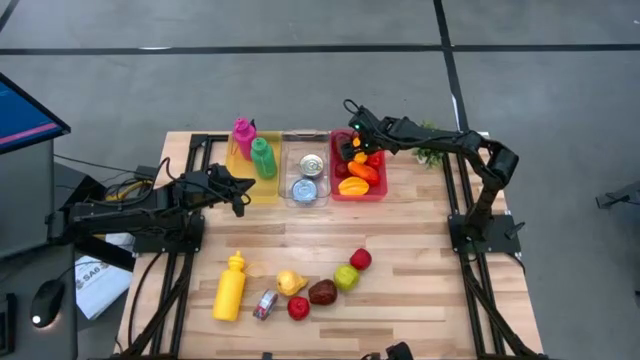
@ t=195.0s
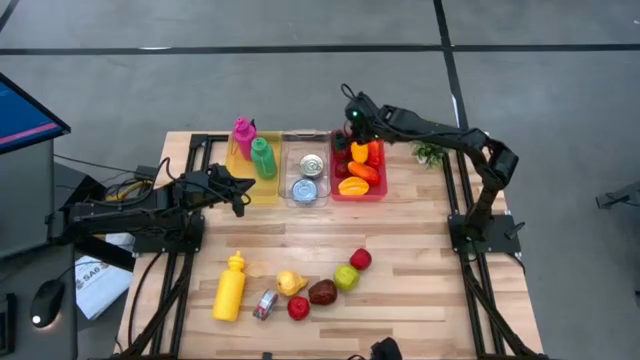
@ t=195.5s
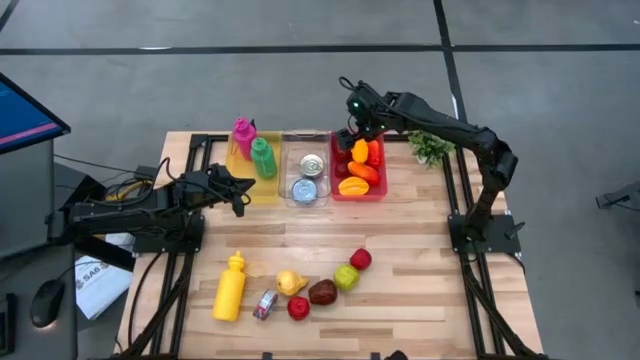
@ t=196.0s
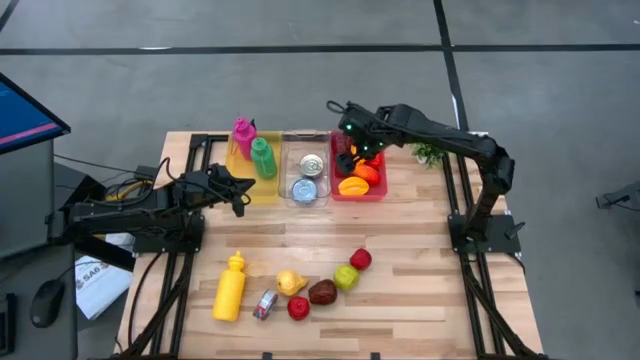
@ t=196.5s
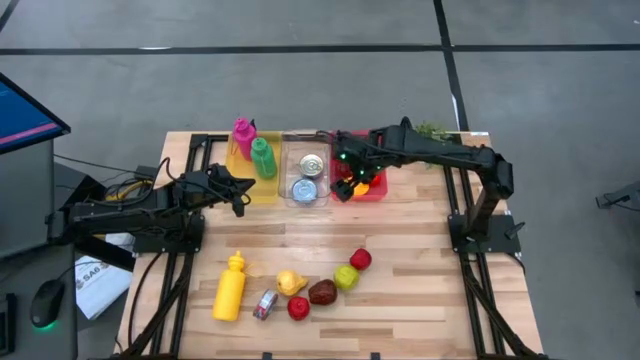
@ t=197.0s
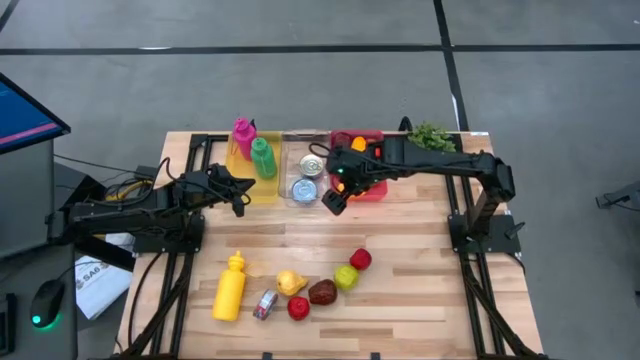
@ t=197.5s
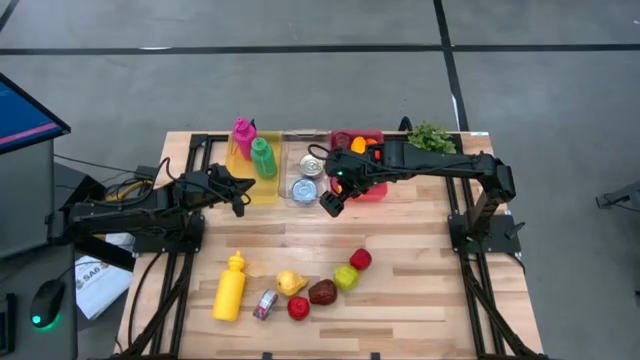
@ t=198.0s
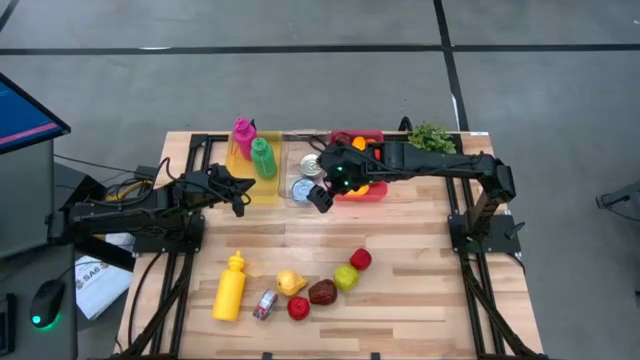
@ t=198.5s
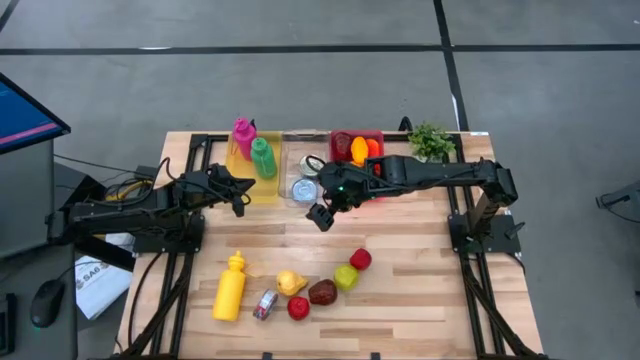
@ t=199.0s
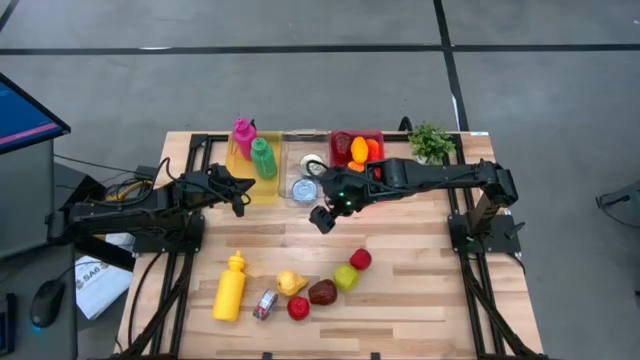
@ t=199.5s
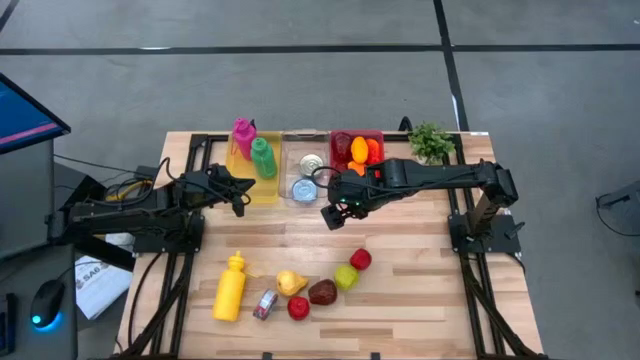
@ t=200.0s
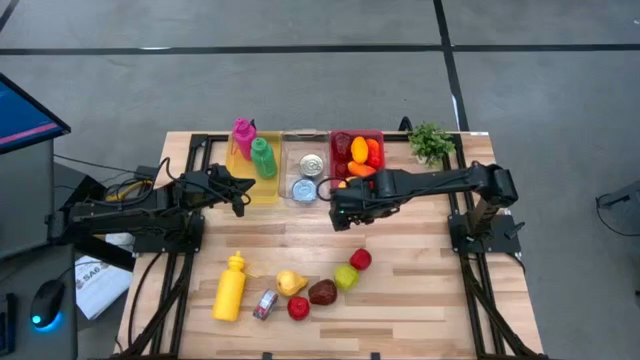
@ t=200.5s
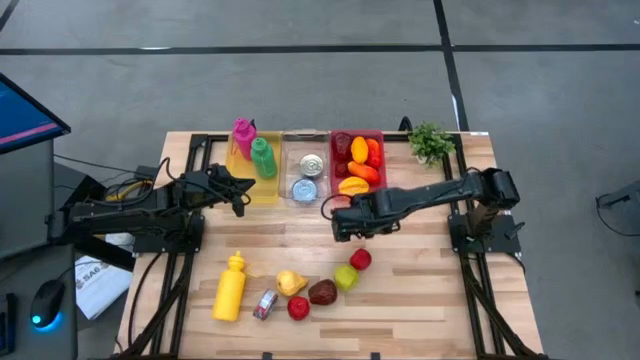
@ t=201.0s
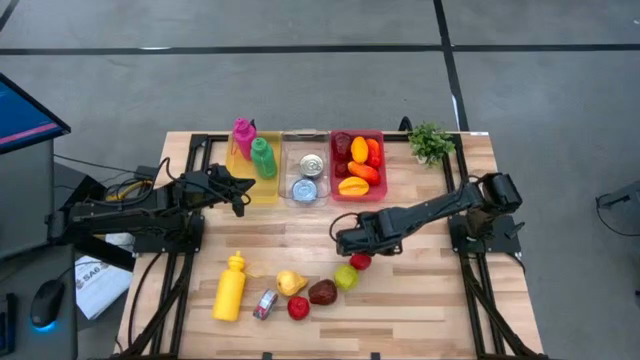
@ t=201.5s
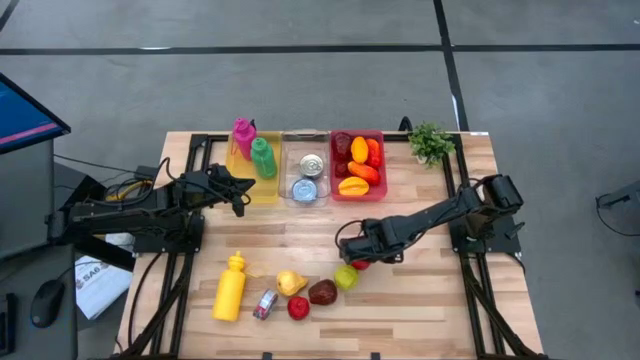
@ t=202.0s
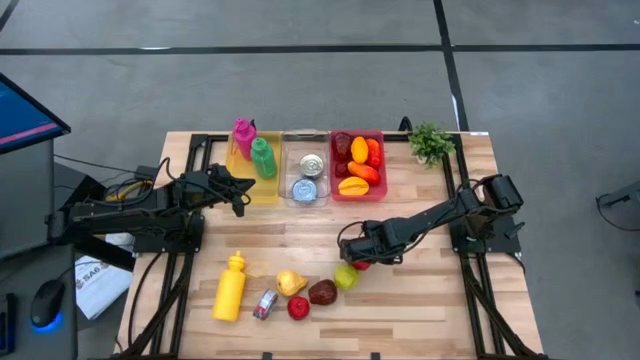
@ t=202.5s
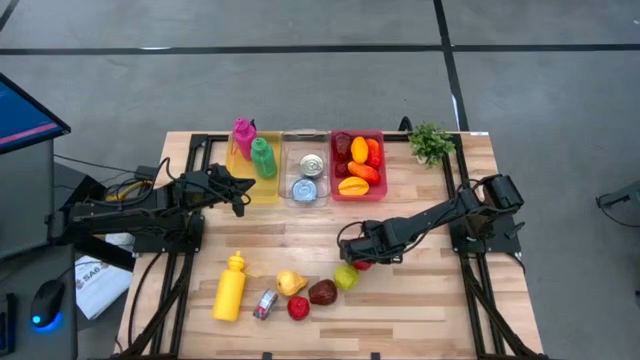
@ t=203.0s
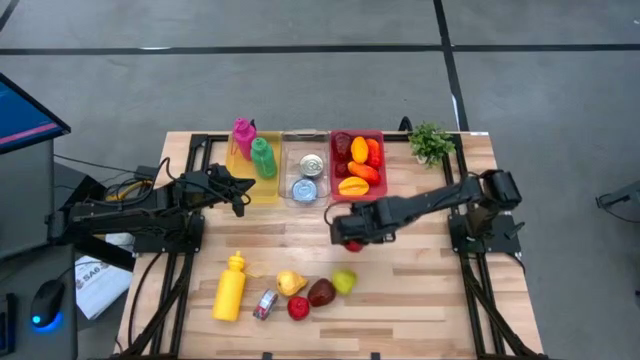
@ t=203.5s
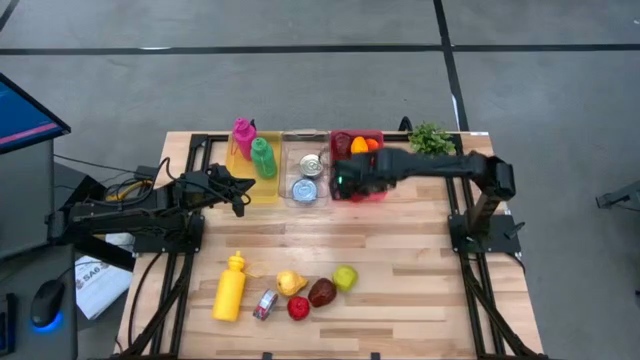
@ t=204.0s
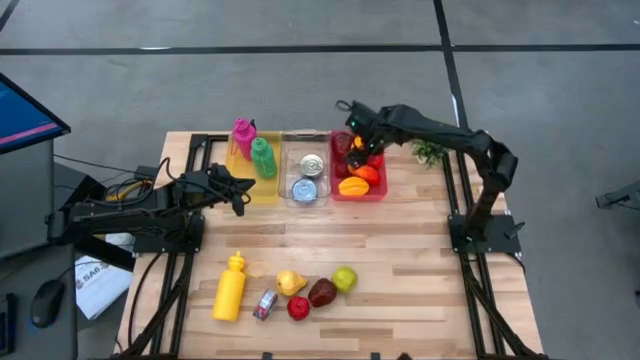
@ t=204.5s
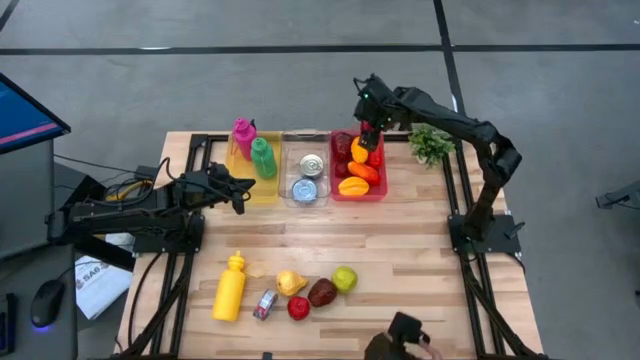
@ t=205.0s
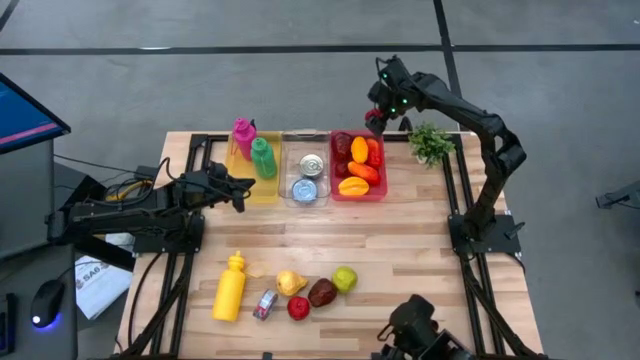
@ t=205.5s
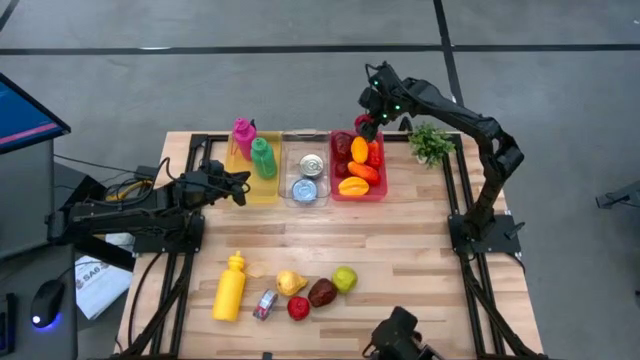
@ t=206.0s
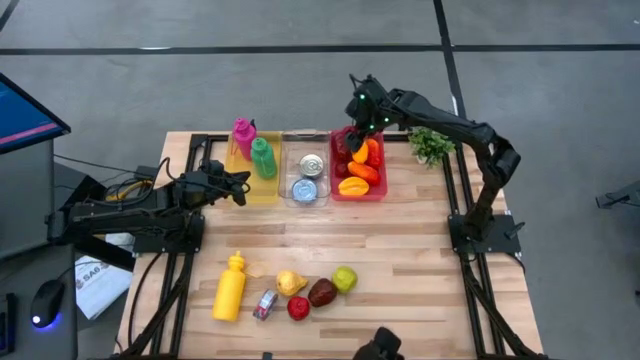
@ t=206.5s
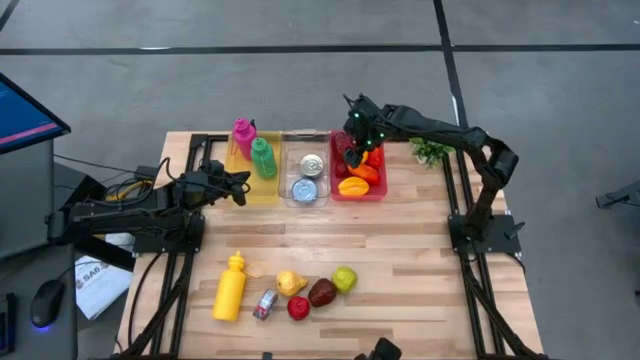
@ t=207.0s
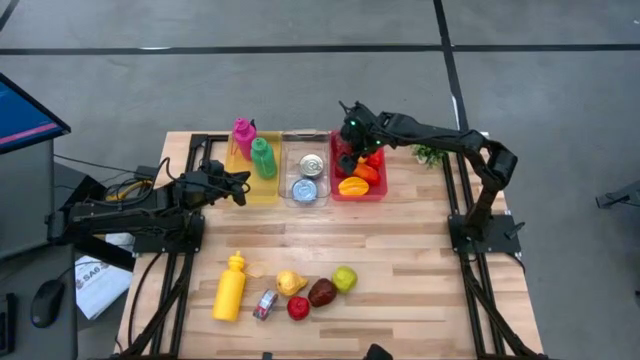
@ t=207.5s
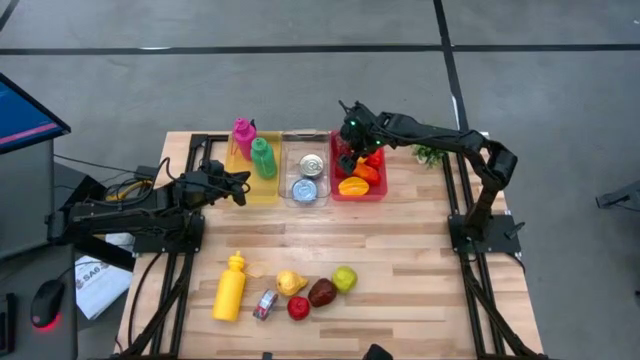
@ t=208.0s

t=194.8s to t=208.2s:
Task: Pick & Place Food Item
Put the top red apple into the pink bin

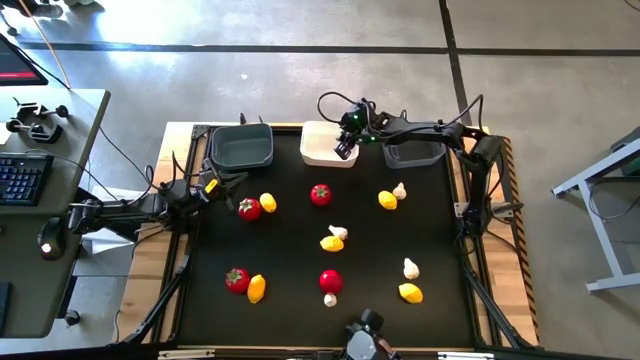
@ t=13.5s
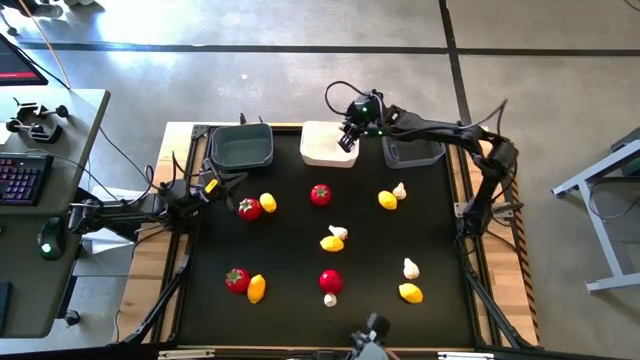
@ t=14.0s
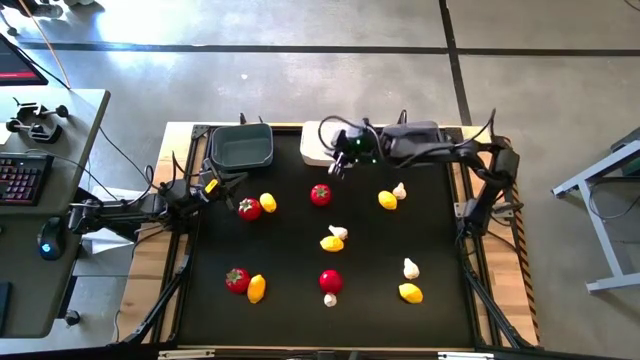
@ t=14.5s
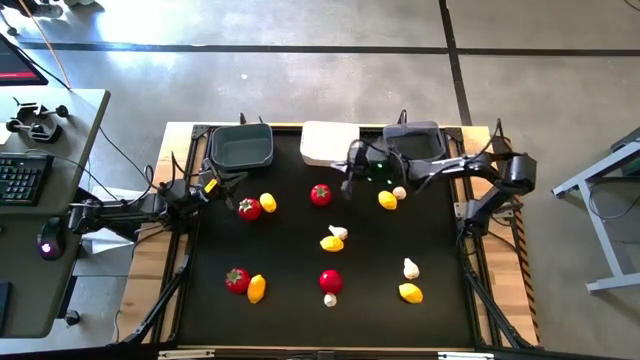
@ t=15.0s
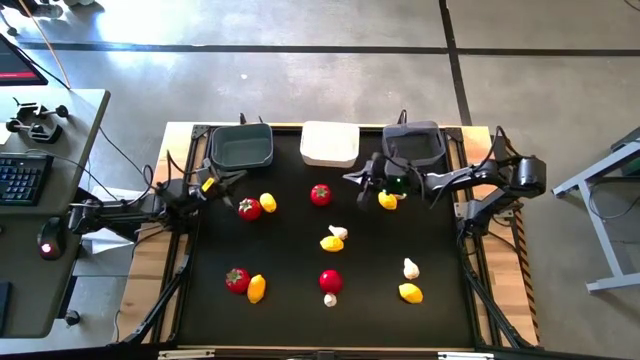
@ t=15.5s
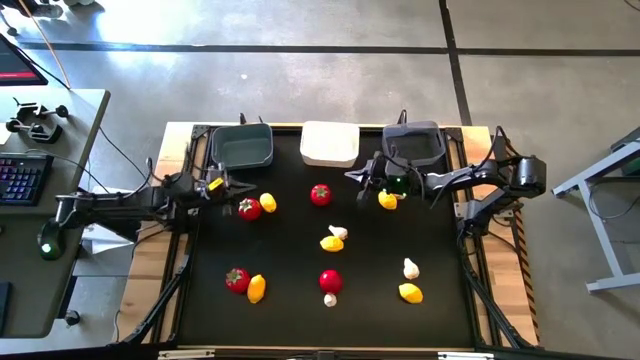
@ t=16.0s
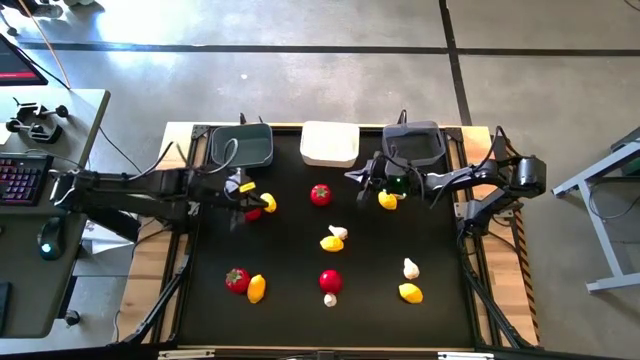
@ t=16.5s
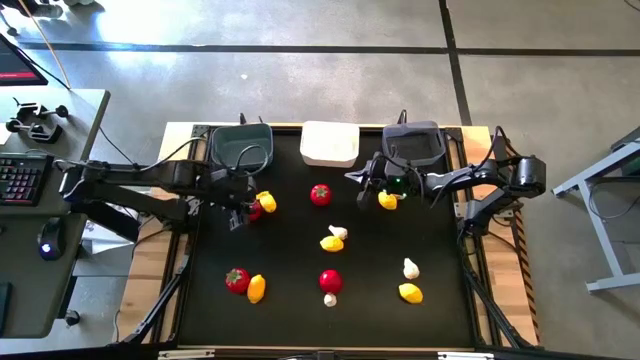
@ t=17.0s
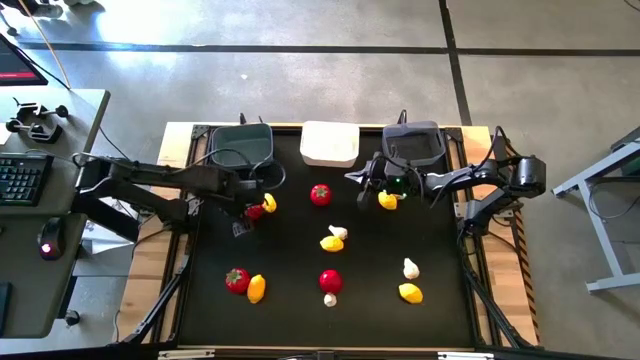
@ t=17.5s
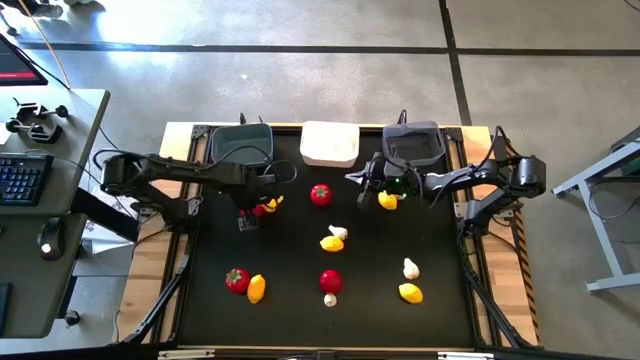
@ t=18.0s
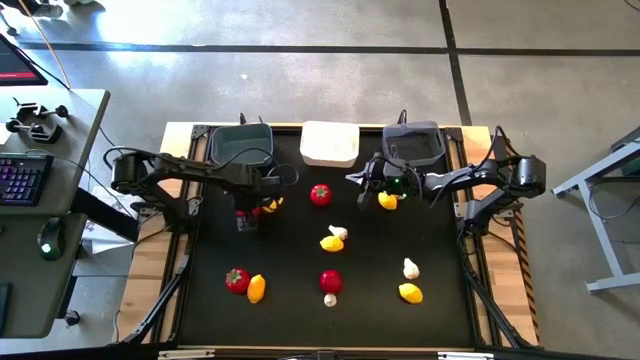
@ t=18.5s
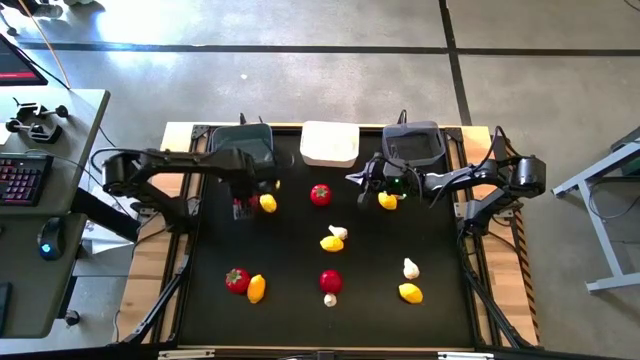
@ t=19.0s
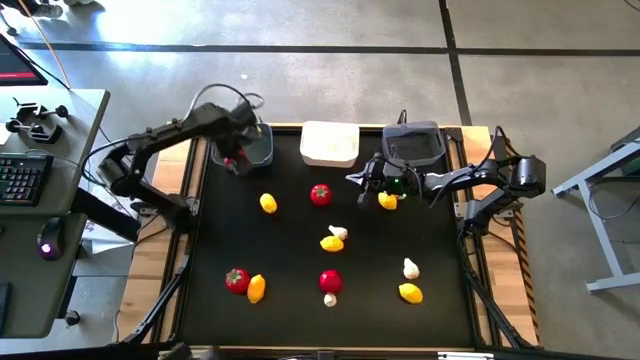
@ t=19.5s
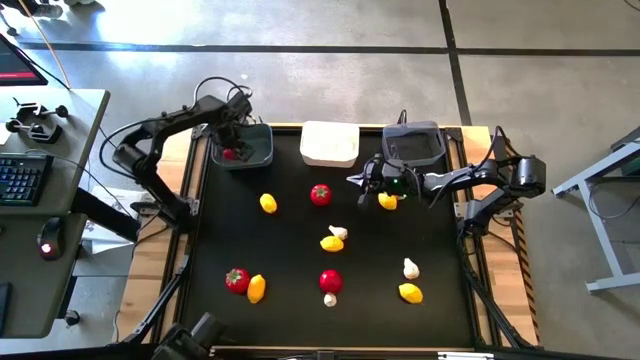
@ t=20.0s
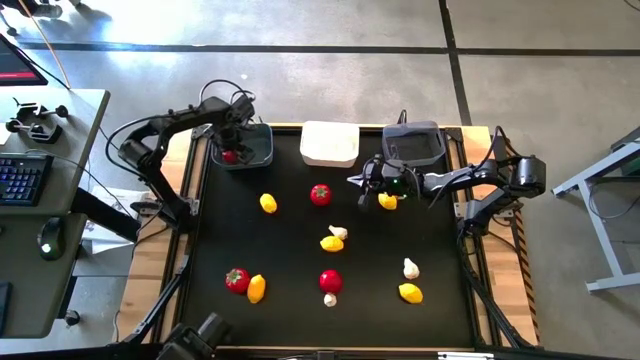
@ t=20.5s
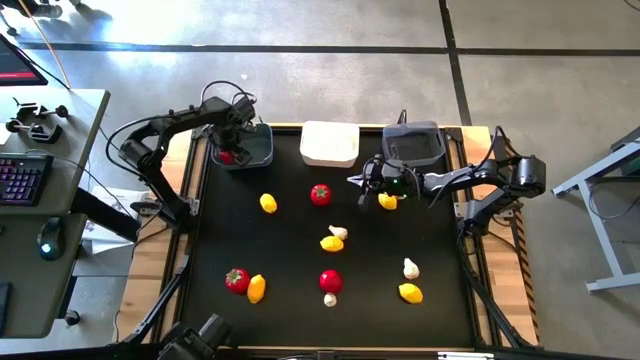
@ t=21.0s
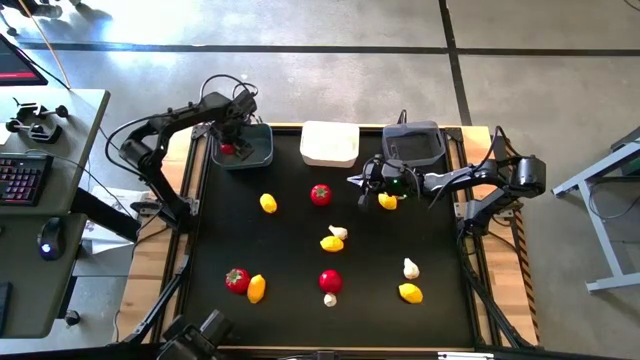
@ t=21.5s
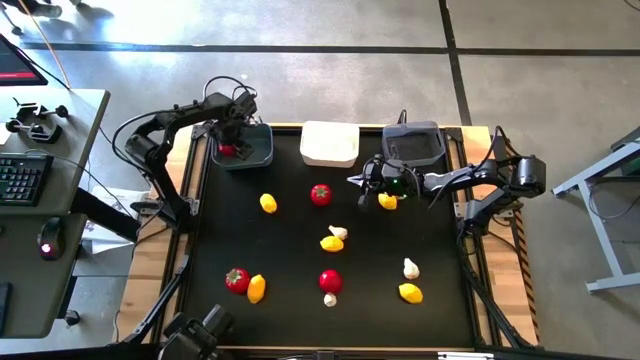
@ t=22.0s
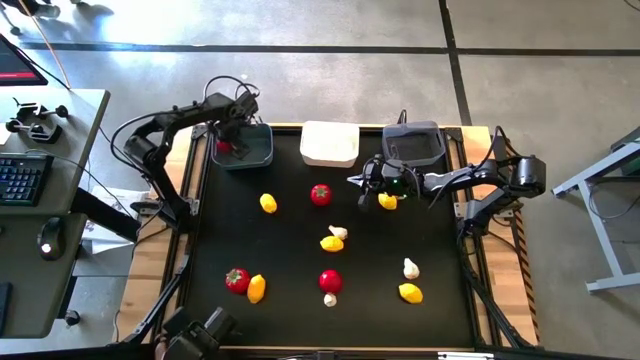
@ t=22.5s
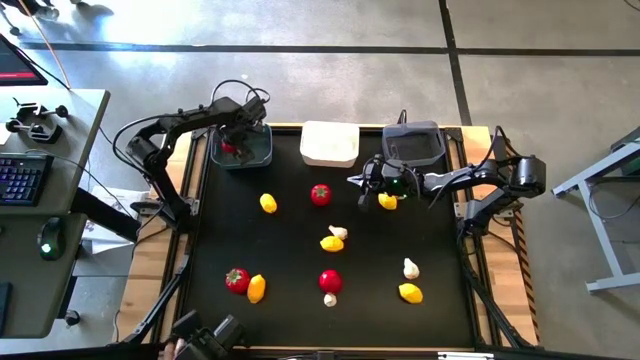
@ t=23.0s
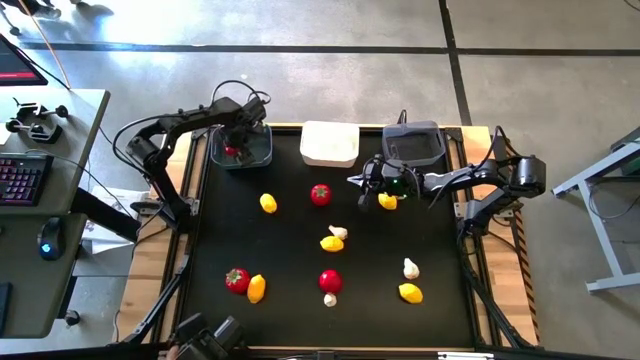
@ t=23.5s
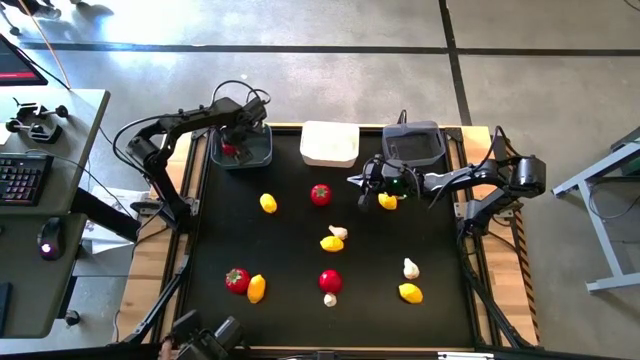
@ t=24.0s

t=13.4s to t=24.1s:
Task: Sort produce into baskets
Put the top left red tomato into the gray bin
